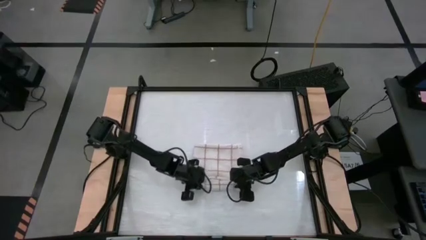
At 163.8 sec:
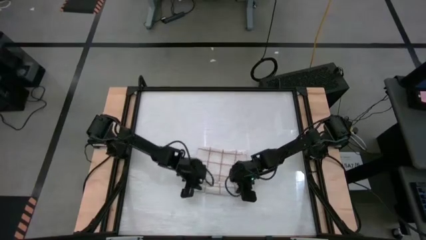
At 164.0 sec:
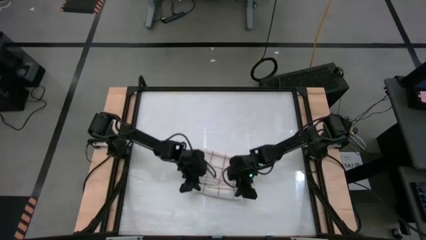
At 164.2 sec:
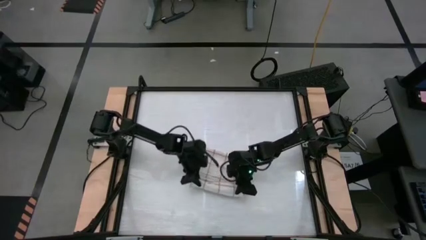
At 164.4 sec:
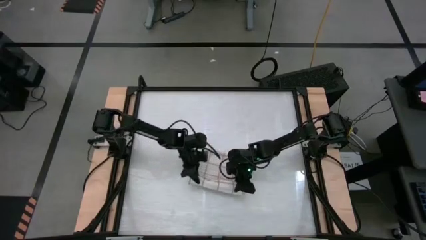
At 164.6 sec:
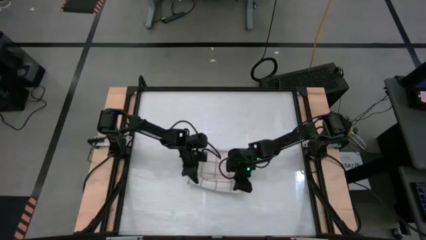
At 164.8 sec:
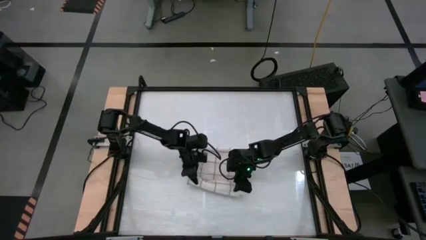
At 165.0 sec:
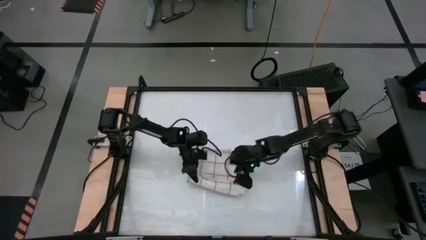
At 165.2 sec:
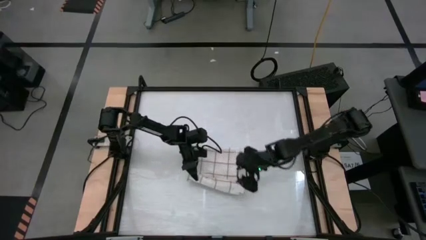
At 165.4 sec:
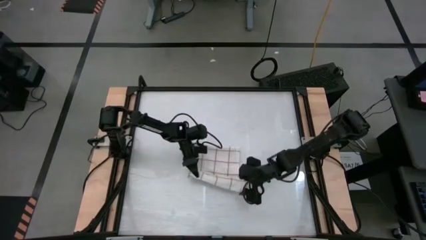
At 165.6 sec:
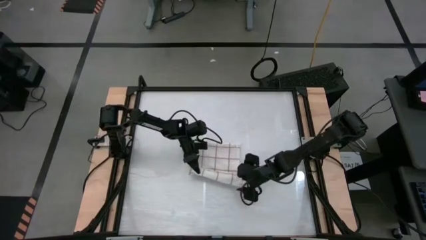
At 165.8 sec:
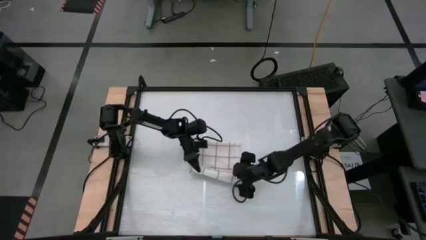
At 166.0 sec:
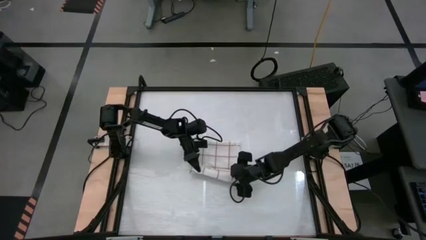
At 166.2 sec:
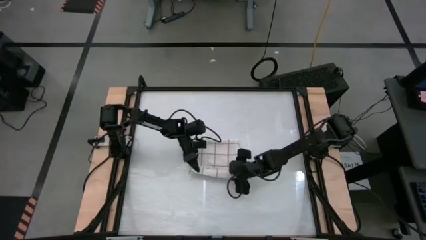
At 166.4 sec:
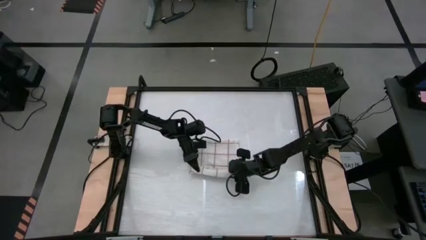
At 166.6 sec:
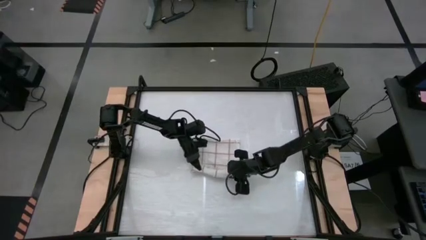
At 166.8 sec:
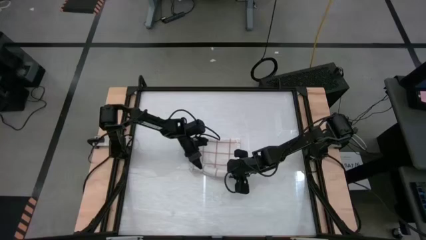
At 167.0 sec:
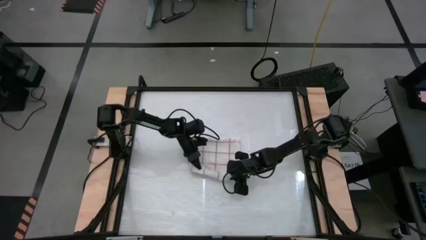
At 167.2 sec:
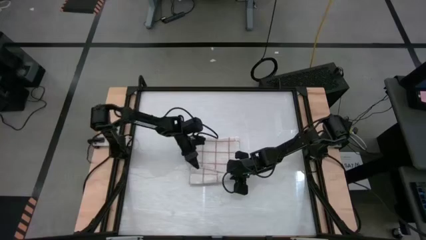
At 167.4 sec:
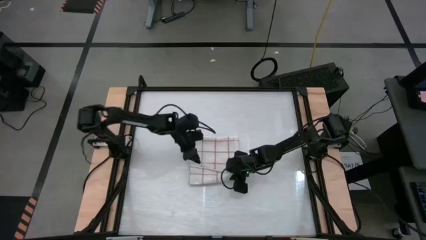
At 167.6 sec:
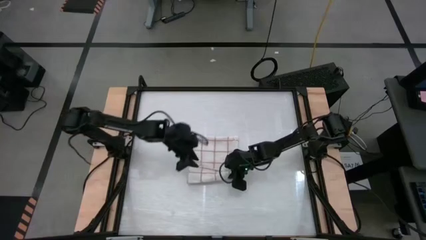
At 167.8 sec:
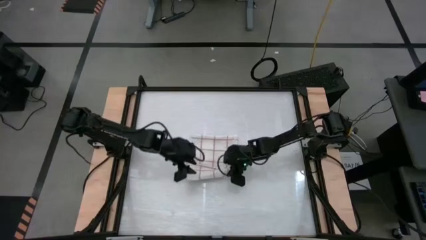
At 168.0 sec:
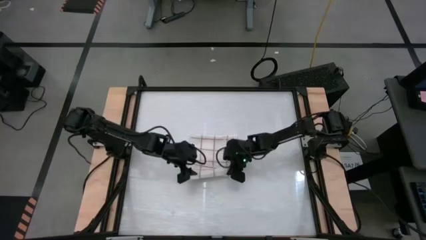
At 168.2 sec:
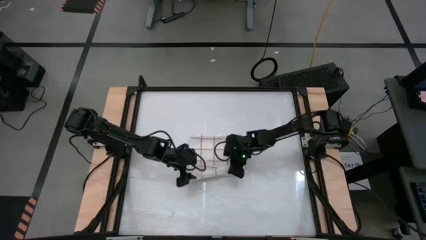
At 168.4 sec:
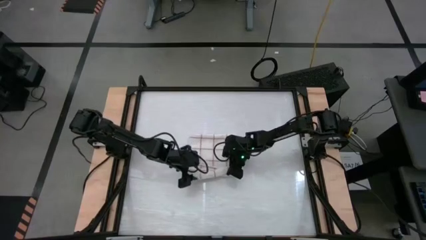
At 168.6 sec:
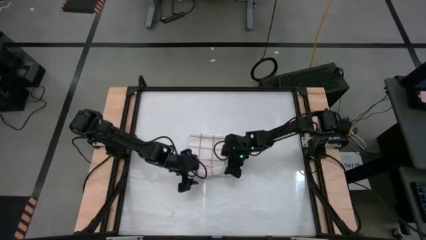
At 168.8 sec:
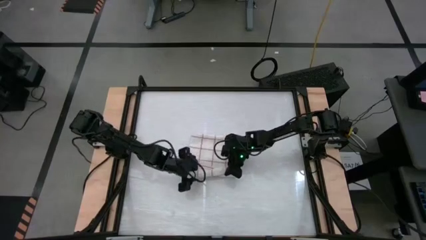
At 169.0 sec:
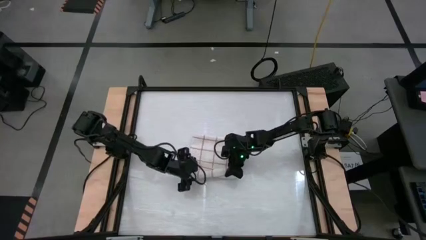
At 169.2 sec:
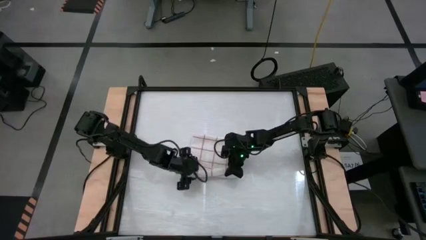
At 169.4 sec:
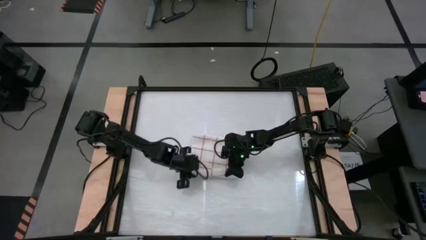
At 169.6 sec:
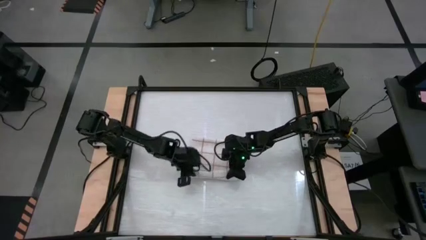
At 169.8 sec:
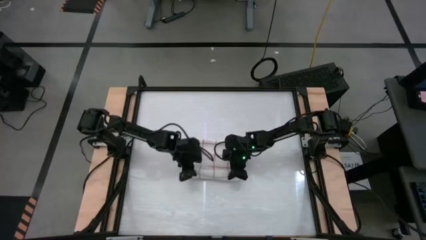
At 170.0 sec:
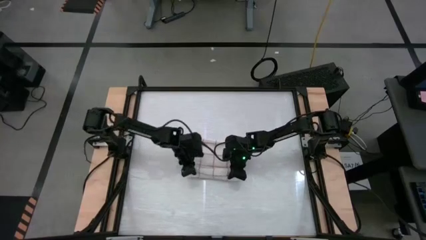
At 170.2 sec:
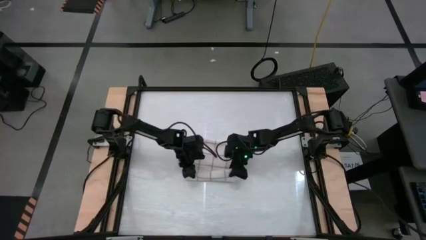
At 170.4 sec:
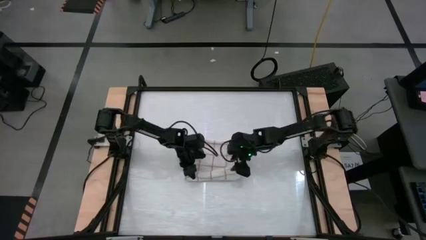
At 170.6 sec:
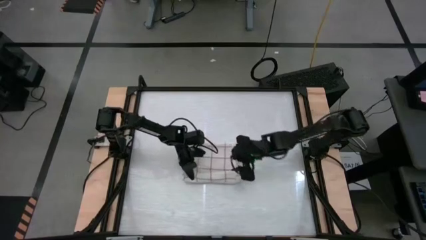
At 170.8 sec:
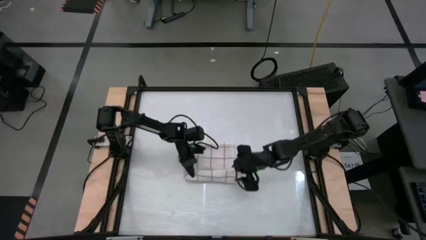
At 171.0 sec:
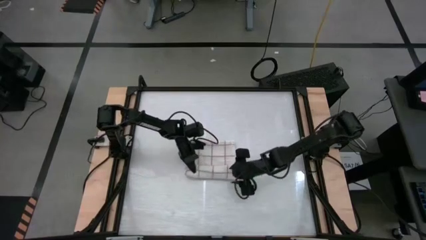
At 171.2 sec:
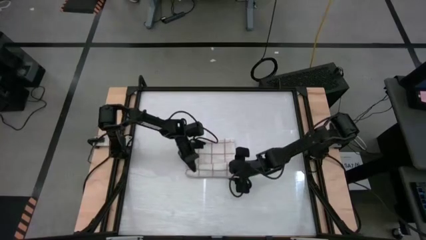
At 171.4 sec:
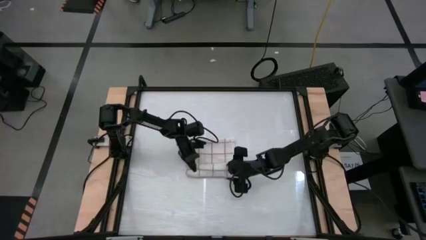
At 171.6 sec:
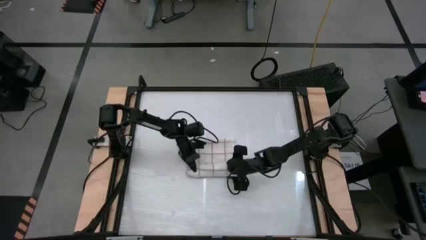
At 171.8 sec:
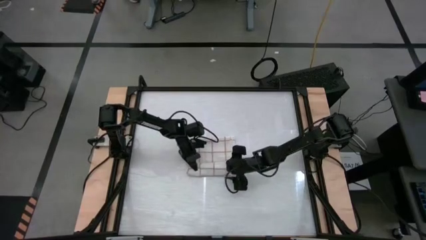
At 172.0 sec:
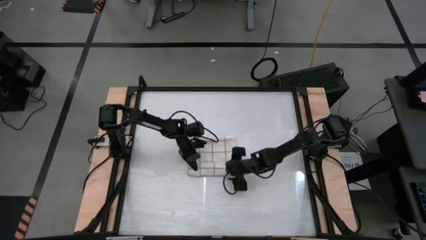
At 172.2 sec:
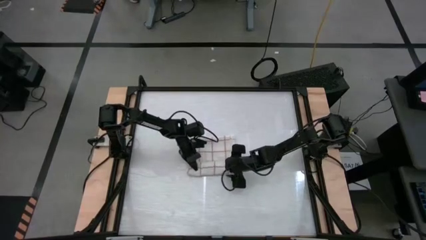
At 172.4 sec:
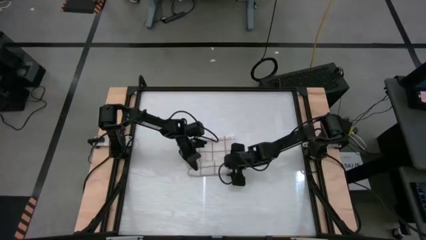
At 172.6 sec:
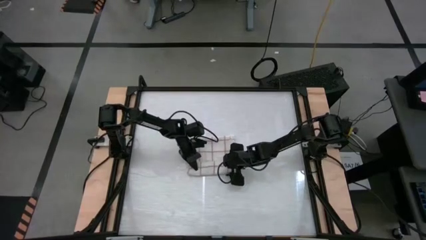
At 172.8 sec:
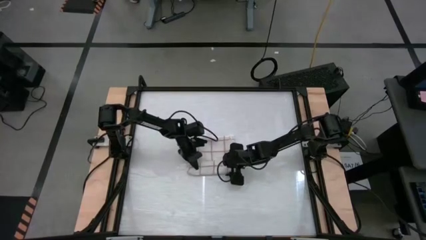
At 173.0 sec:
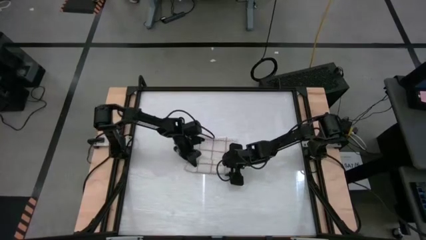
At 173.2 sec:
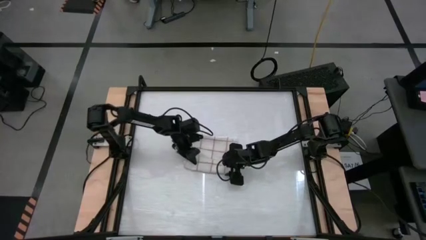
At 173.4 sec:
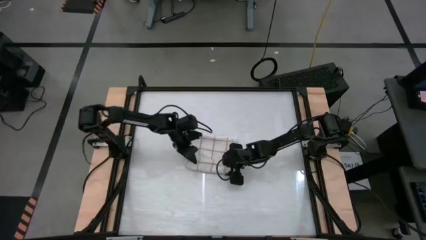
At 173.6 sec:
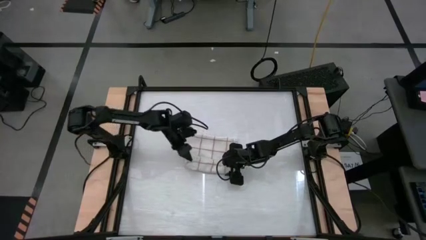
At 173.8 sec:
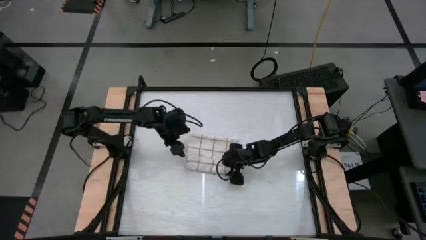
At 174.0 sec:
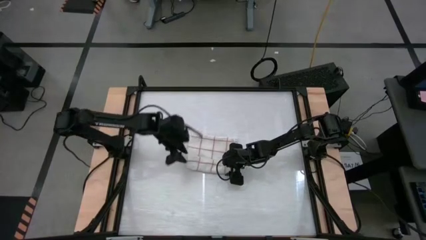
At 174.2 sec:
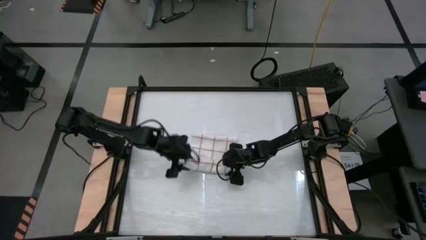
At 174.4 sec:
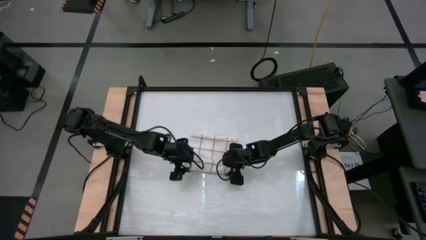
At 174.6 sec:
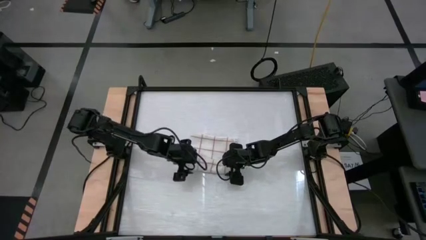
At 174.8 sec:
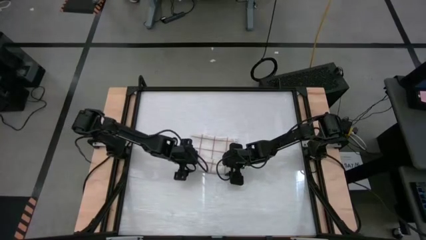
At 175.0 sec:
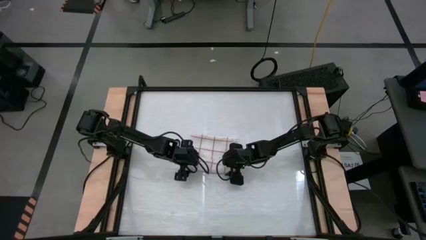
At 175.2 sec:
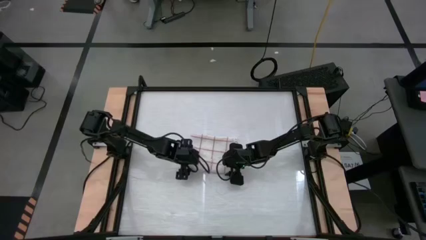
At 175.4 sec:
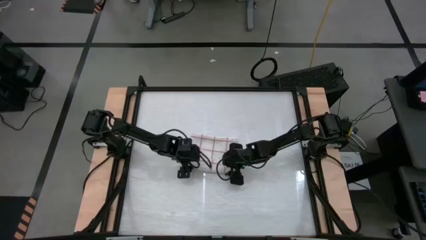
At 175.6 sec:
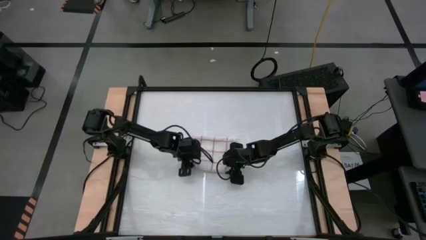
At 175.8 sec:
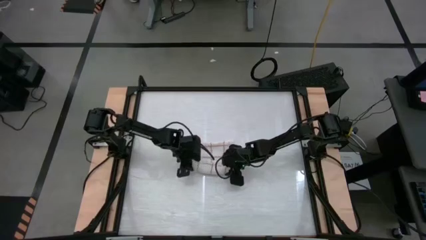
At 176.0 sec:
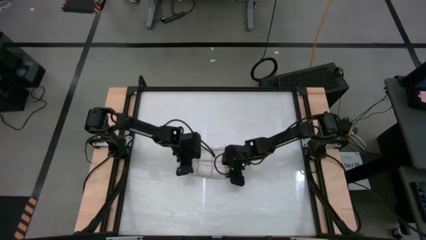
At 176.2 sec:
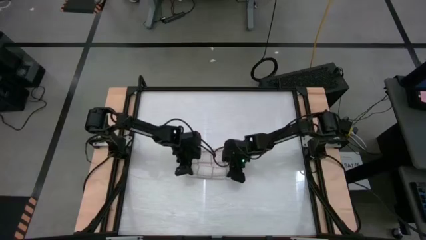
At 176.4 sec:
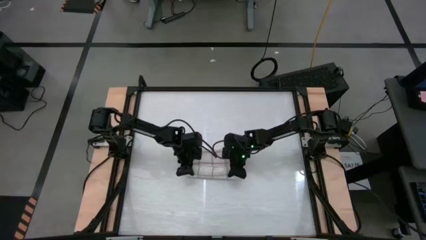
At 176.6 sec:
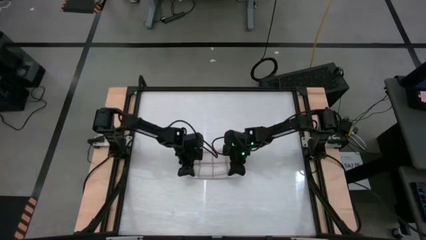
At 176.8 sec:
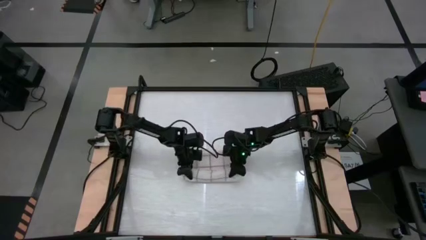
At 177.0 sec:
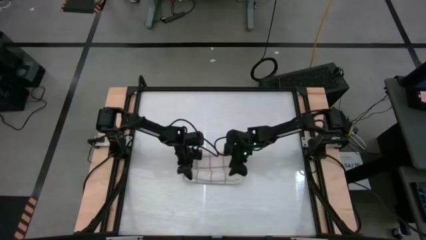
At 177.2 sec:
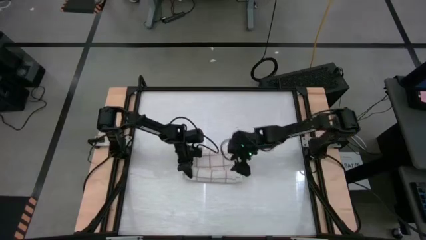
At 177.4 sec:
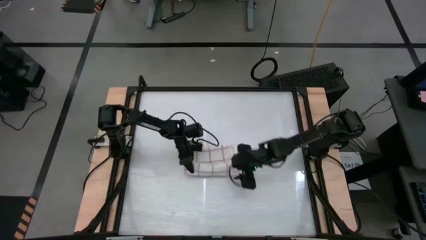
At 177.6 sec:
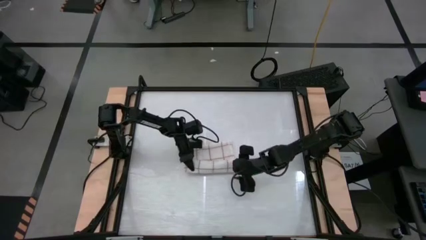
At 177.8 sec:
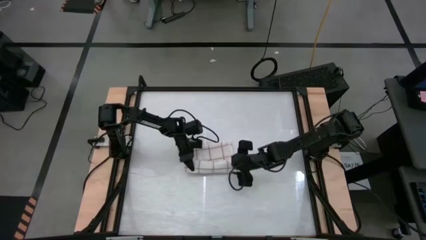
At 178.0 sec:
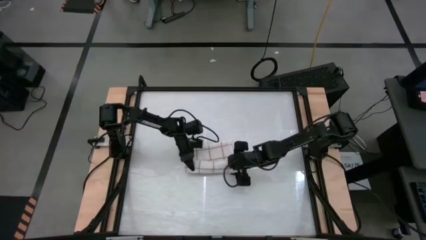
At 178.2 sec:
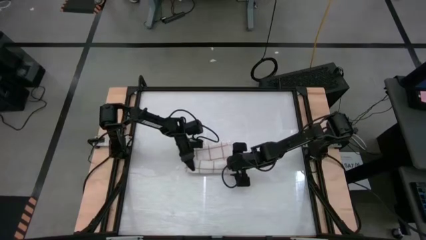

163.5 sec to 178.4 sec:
Task: Roll towel
Roll the white checkered towel
